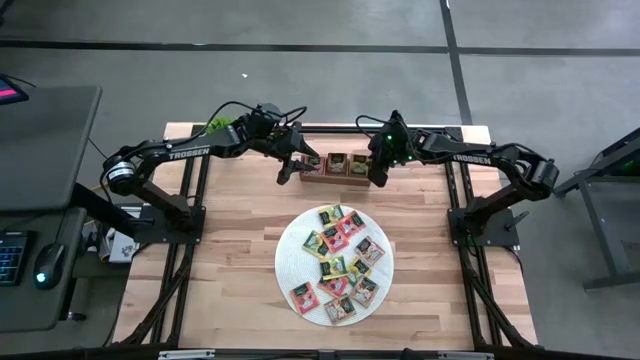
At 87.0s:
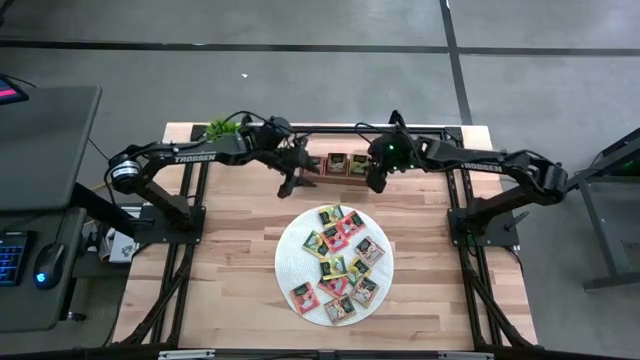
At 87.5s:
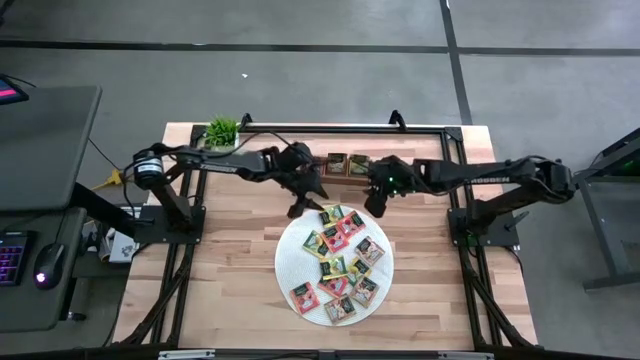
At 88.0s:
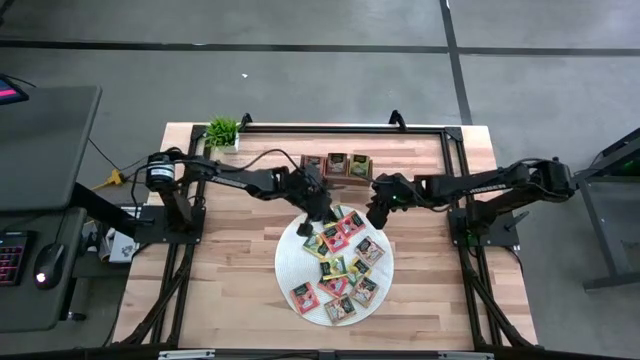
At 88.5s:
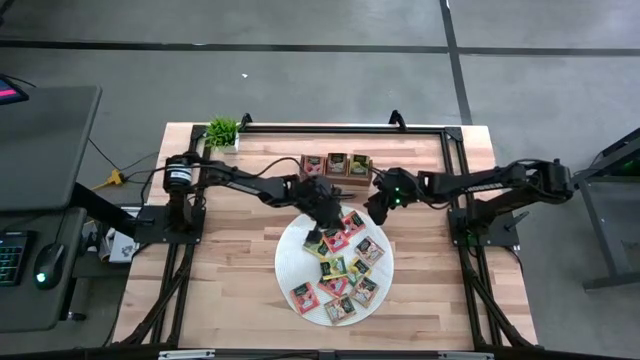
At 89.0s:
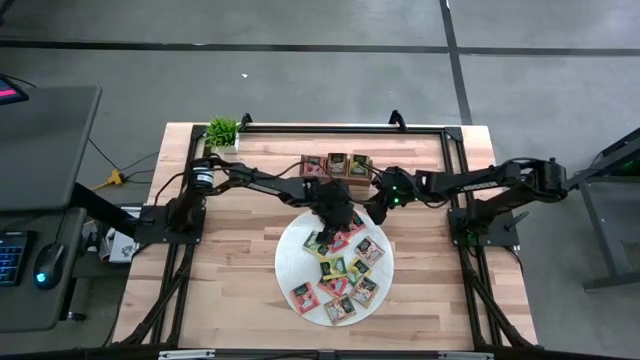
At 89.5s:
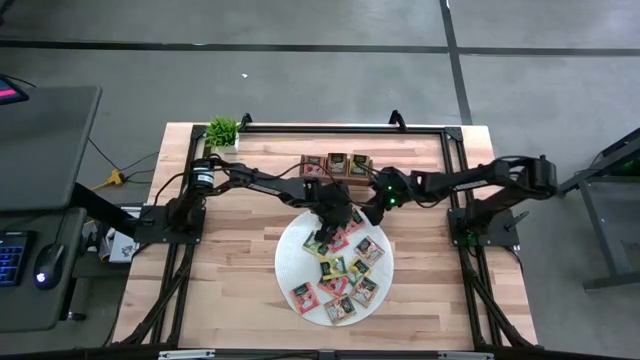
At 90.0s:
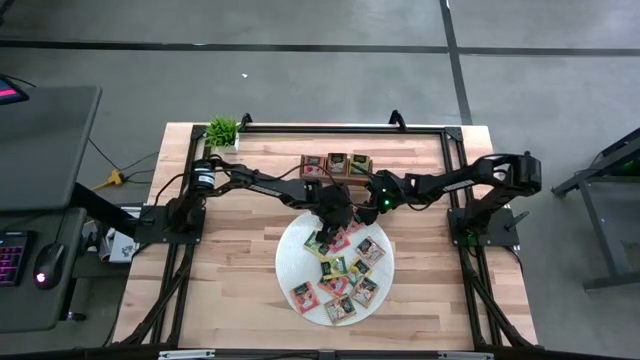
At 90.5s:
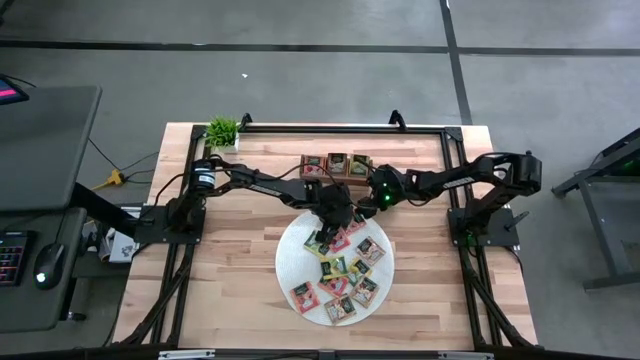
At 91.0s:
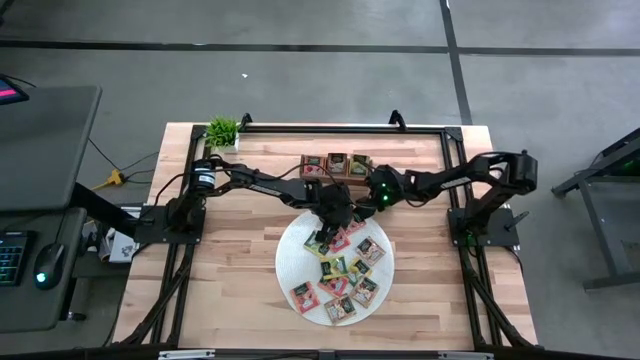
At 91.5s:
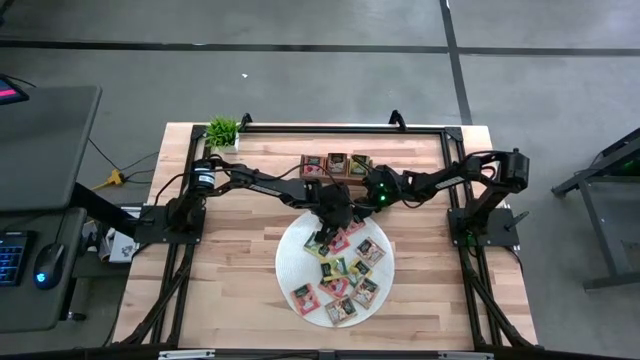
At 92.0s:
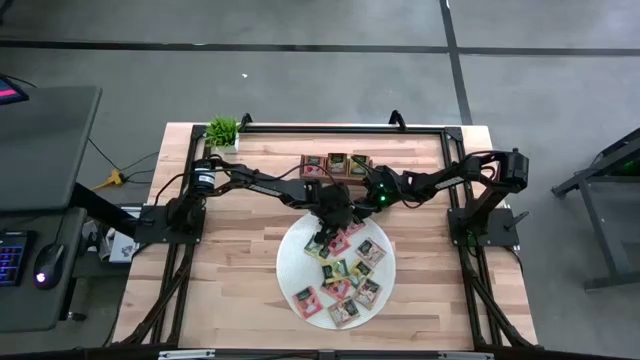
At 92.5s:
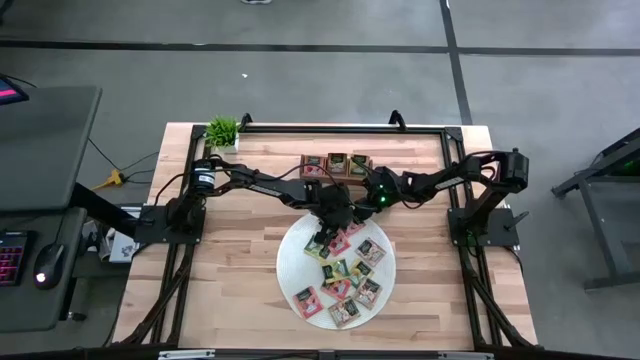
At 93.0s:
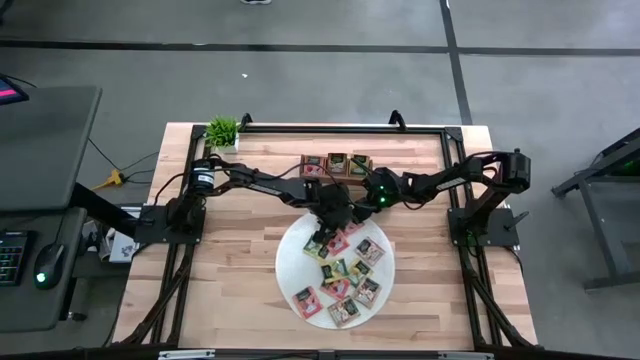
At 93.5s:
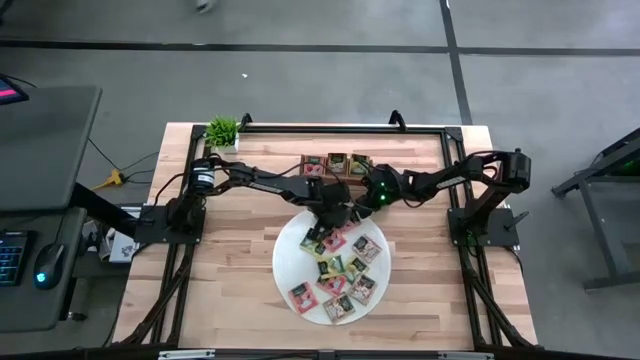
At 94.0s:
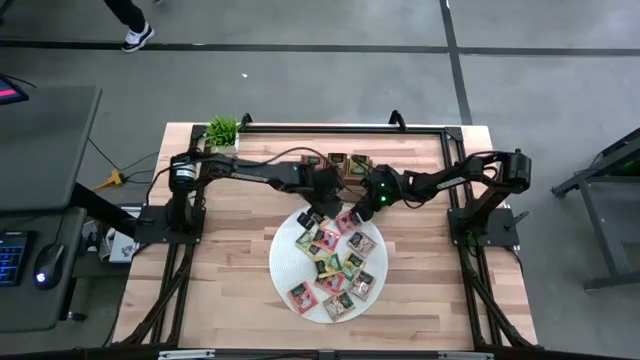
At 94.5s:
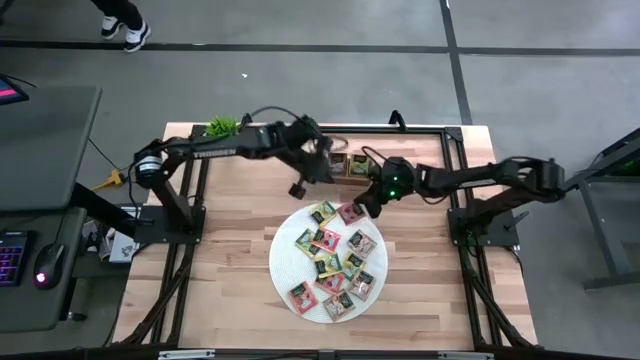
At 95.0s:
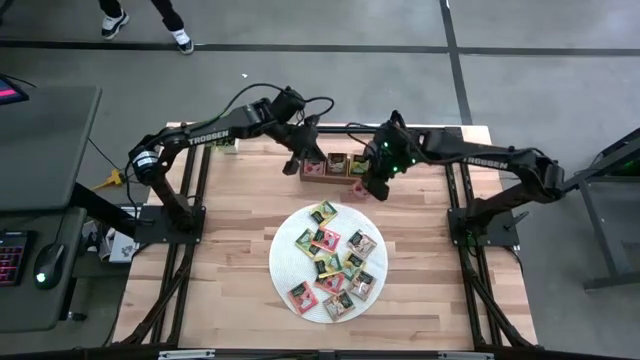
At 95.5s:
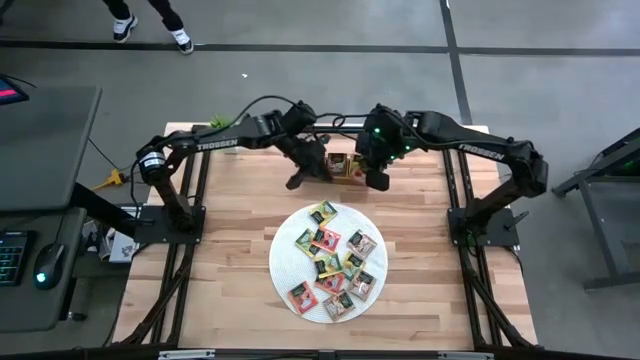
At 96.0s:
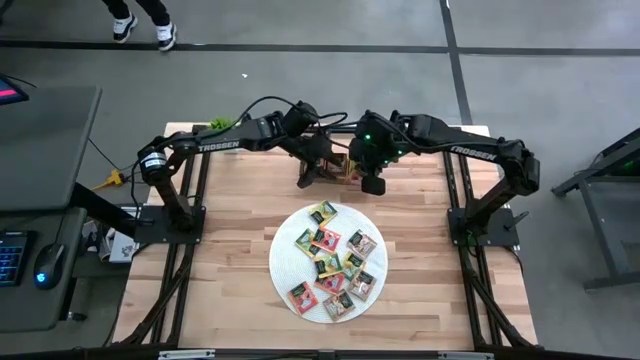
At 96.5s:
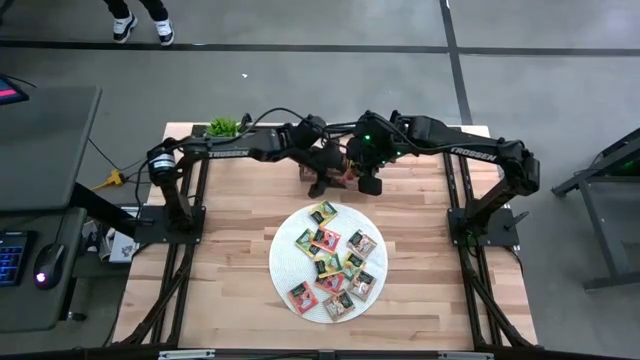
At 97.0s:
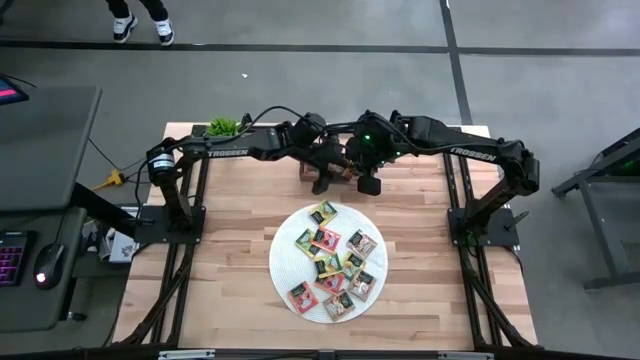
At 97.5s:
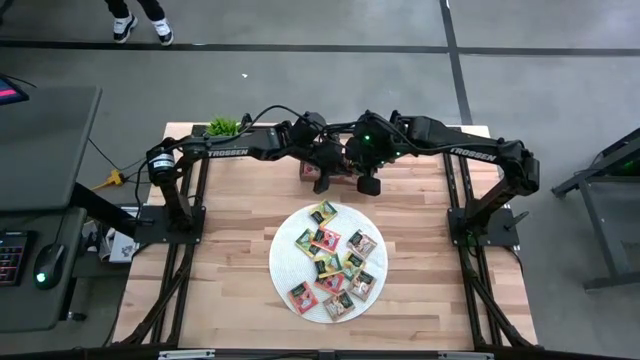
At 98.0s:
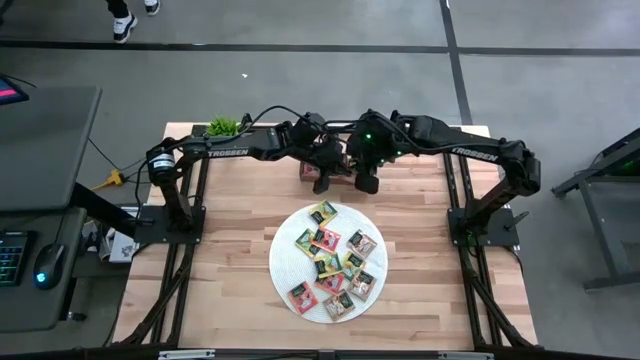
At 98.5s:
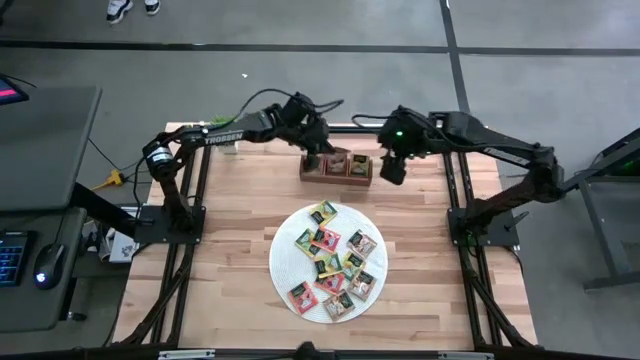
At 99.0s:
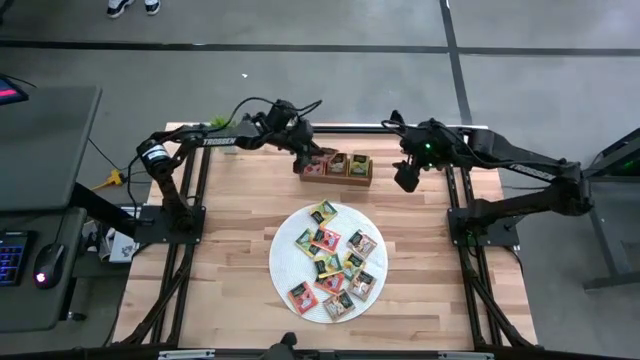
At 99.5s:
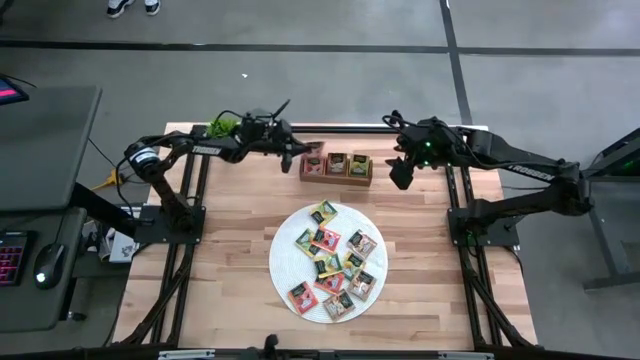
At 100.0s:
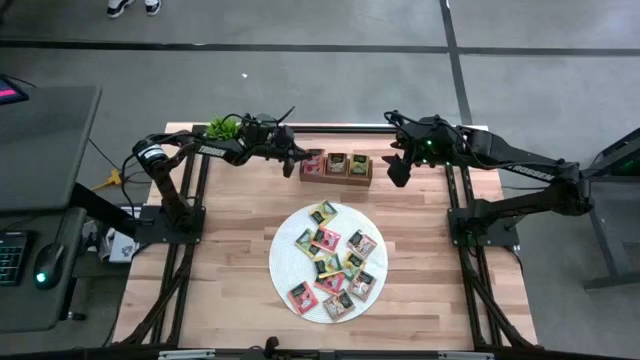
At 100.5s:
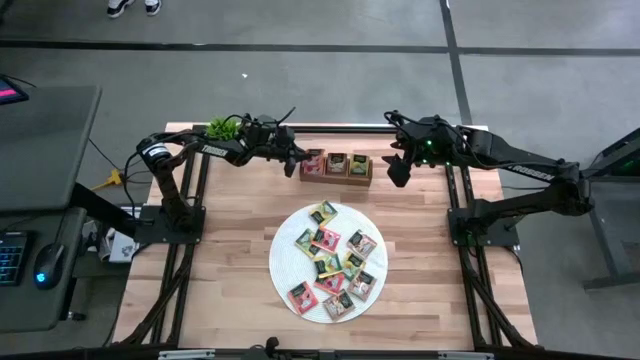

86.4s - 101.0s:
Task: Pick & Place Tea
Put the orange tea bag into the left section of the wooden organizer
